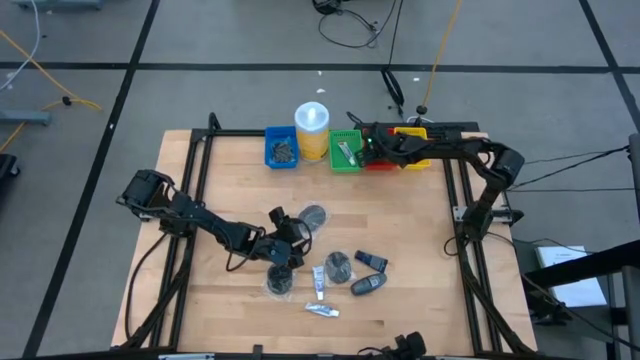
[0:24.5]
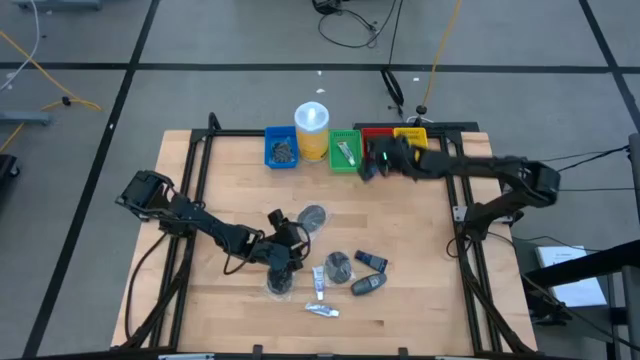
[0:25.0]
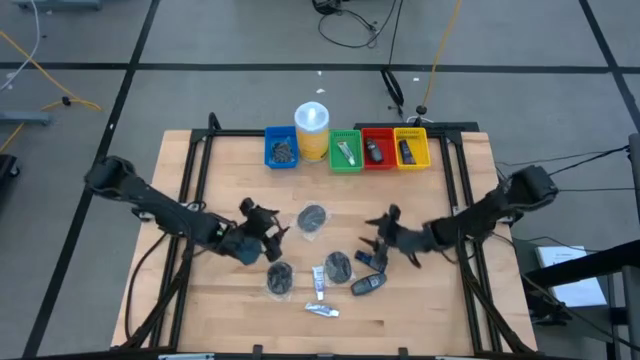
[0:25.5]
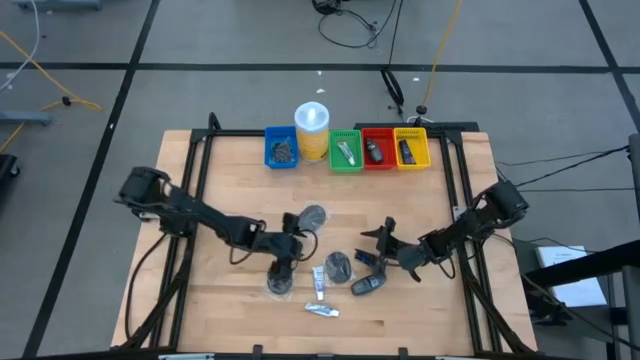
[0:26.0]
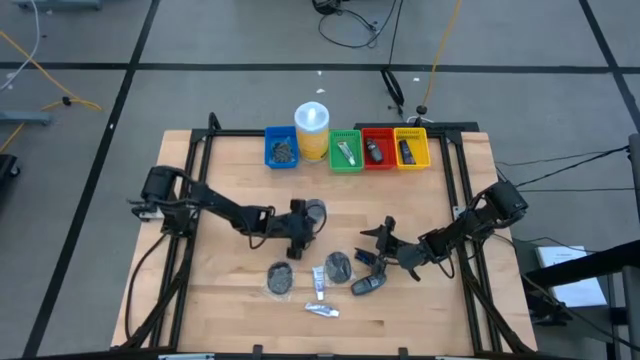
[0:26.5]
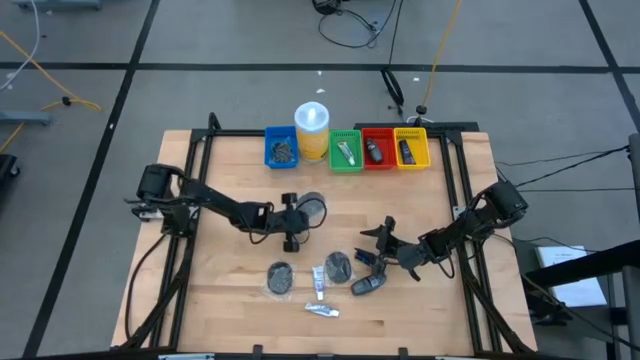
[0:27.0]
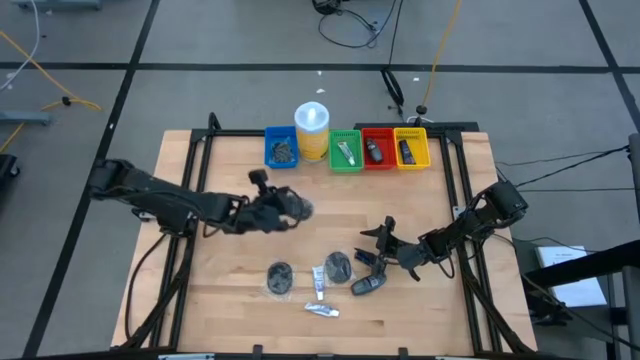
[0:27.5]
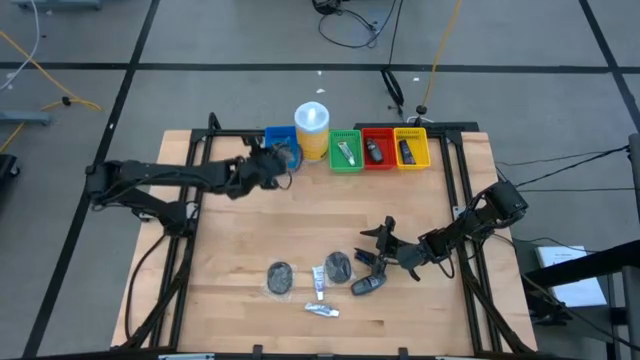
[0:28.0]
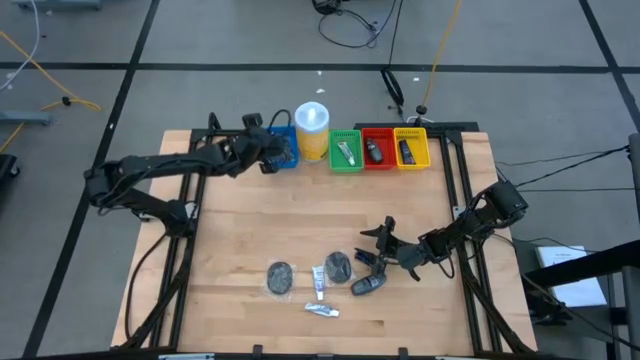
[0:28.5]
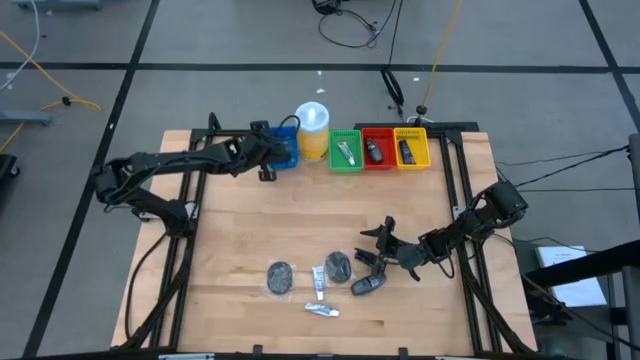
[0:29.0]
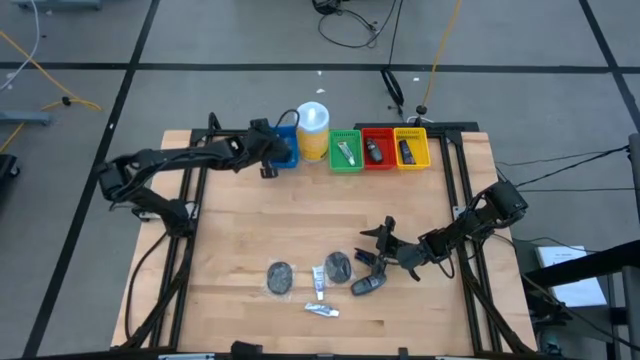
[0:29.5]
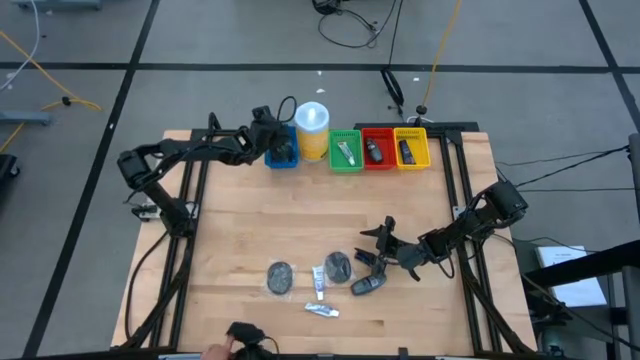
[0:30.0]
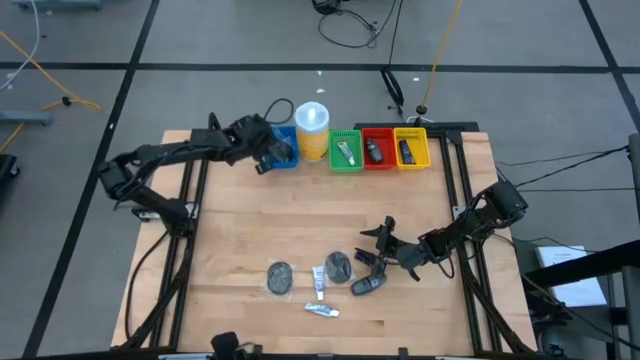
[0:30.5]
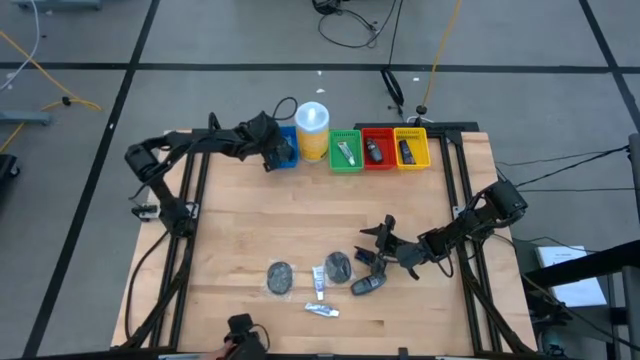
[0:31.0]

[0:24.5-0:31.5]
Task: Pick & Place Travel size toiletries
Put the hairbrush into the blue basket

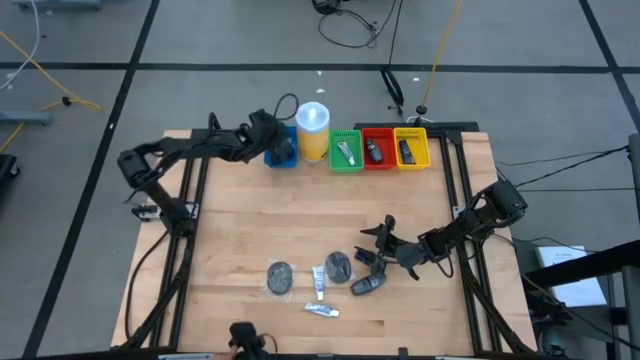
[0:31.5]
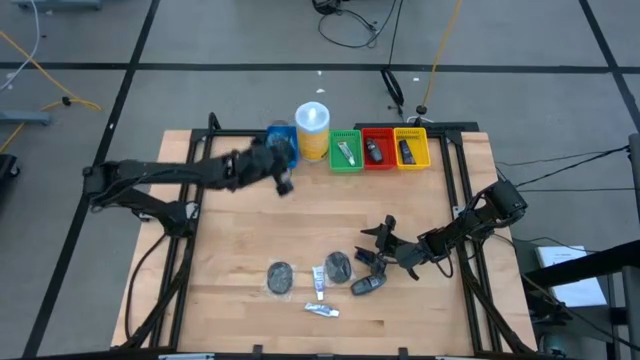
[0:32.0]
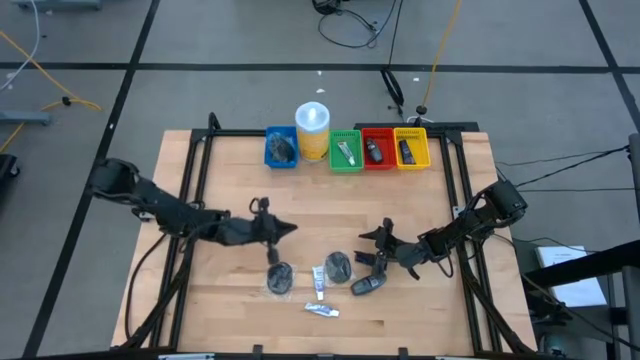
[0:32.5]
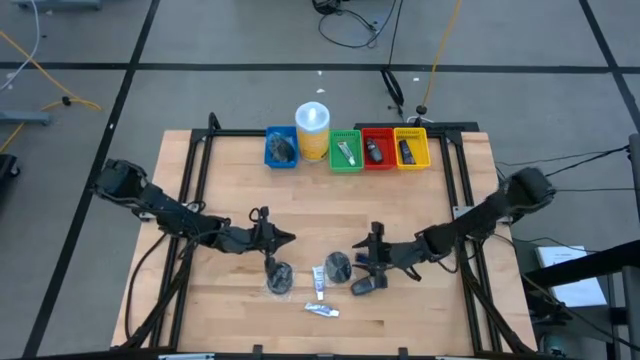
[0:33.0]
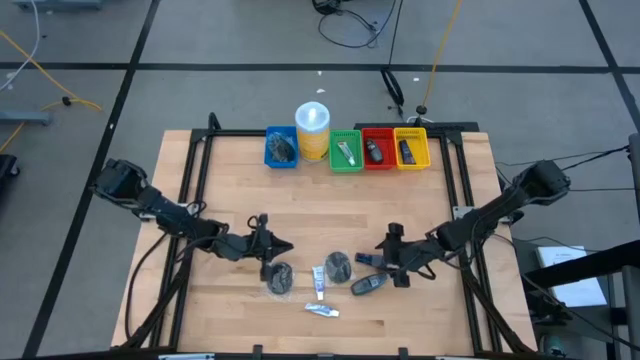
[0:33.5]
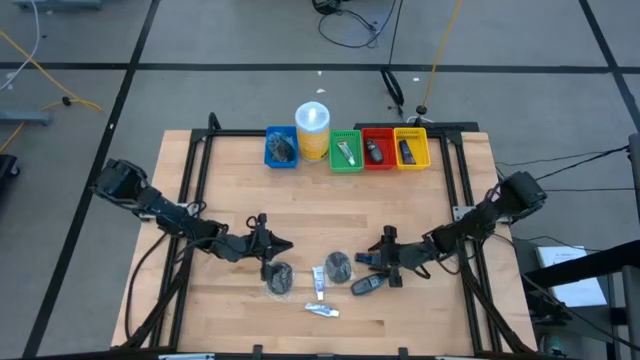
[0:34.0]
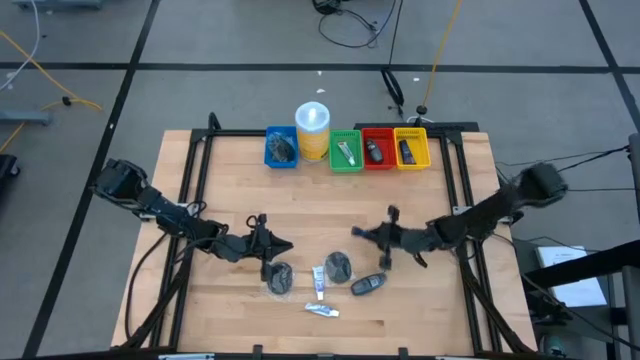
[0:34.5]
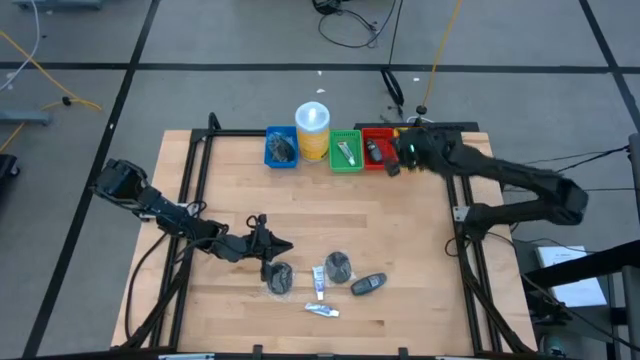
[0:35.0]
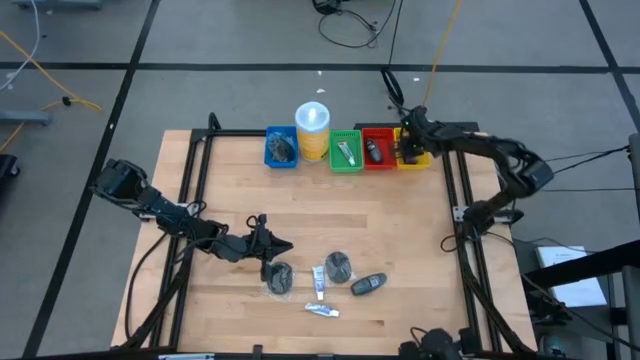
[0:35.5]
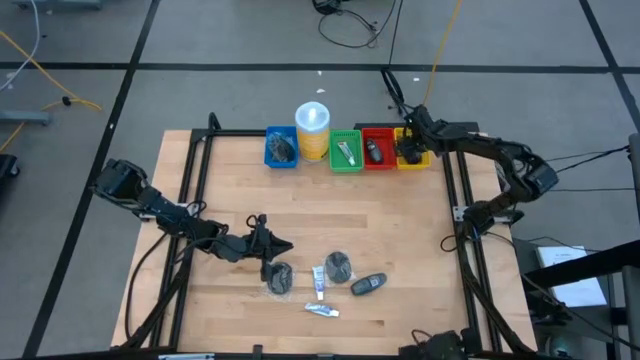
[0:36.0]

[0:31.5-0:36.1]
Put the shave cream into the yellow basket

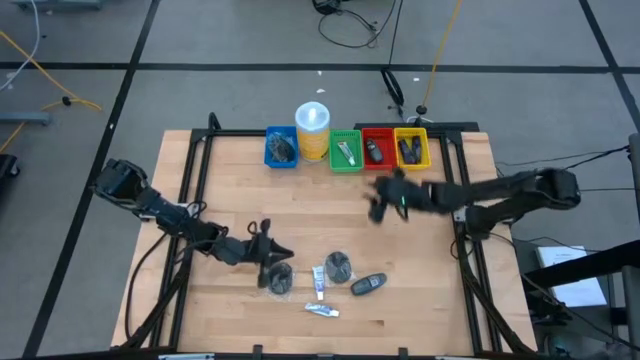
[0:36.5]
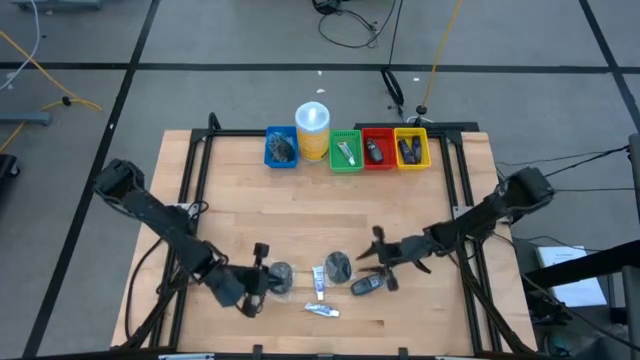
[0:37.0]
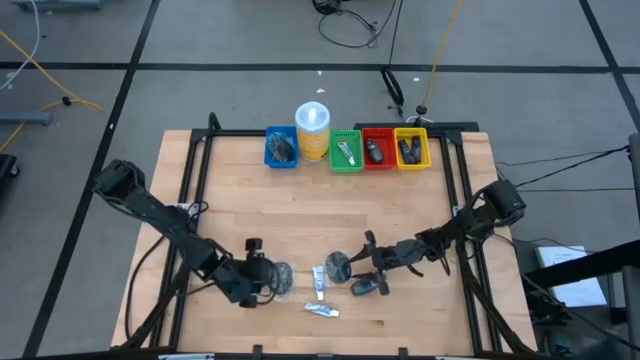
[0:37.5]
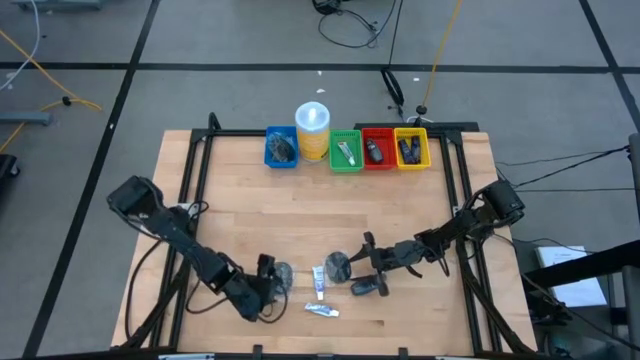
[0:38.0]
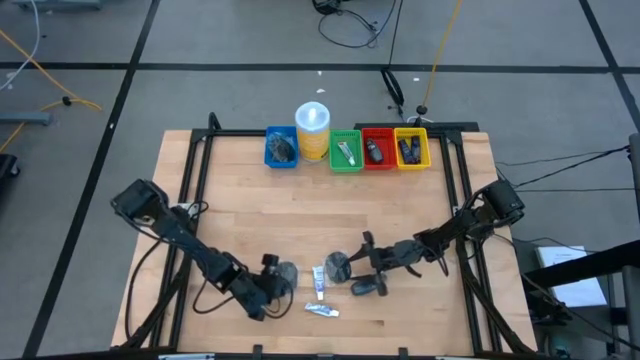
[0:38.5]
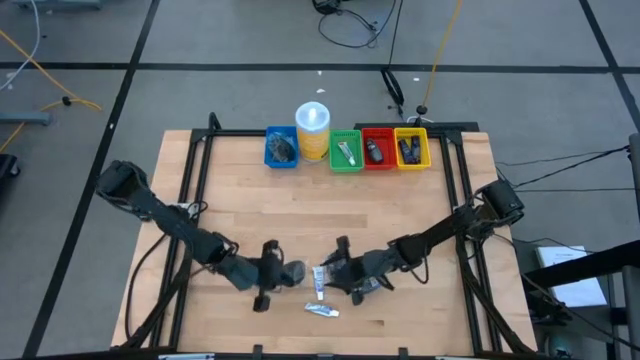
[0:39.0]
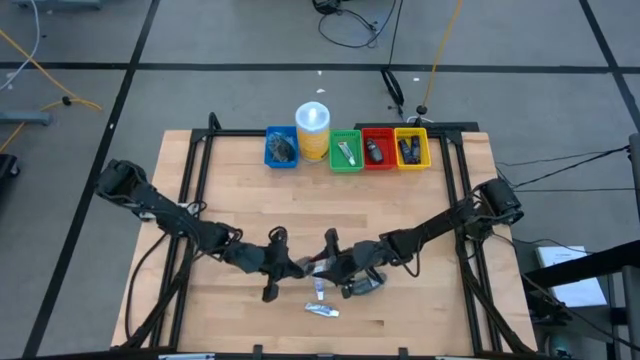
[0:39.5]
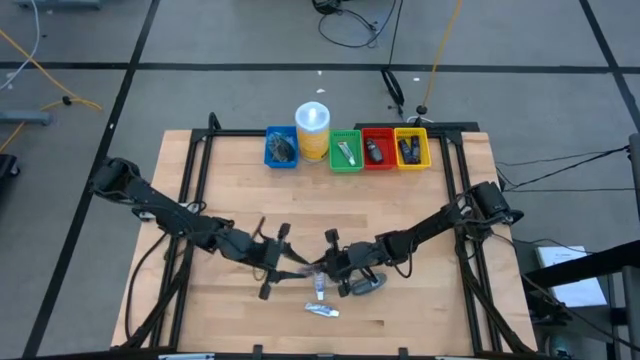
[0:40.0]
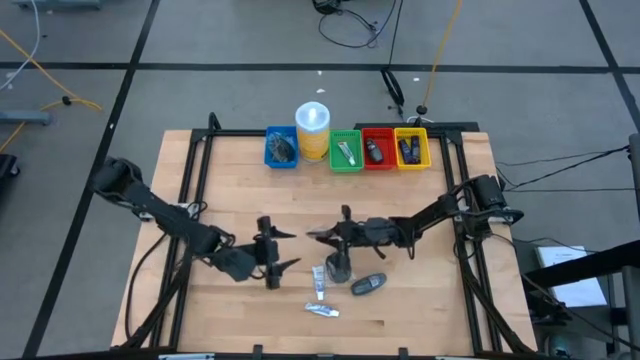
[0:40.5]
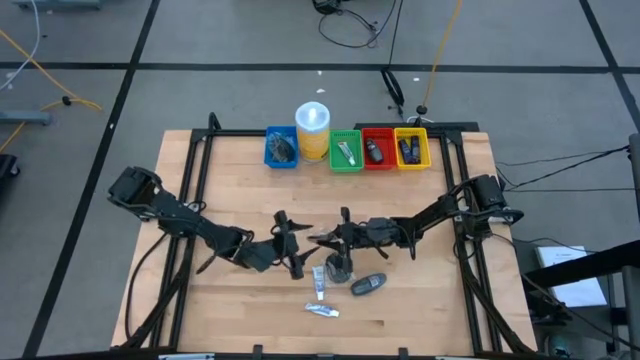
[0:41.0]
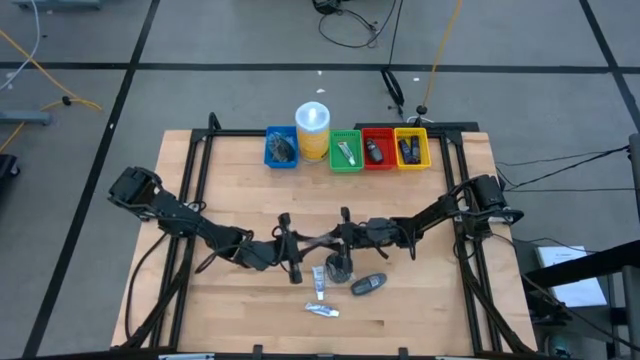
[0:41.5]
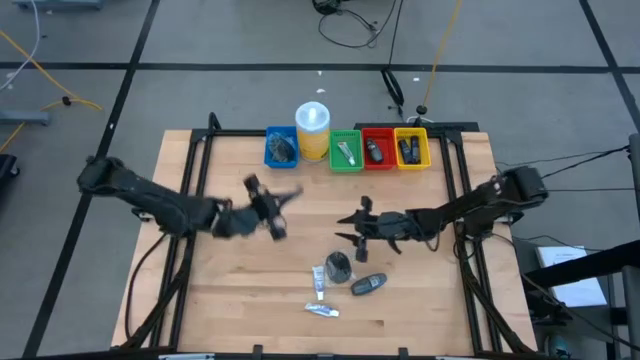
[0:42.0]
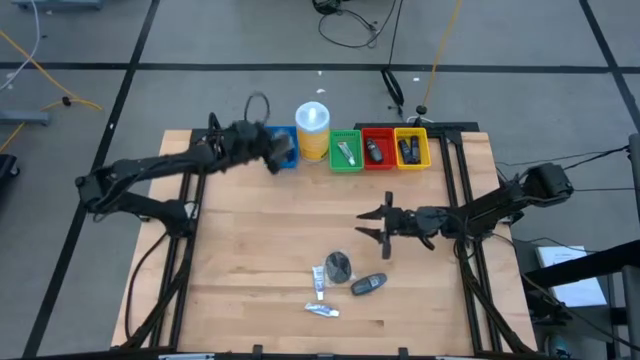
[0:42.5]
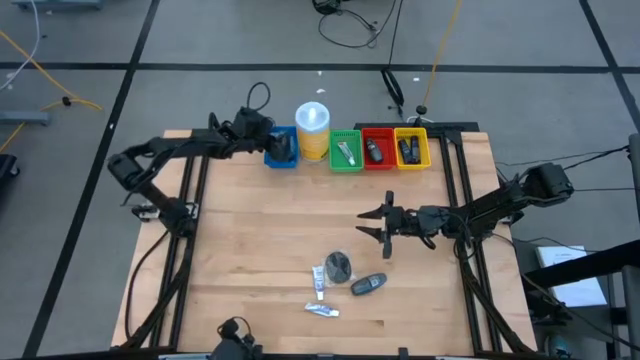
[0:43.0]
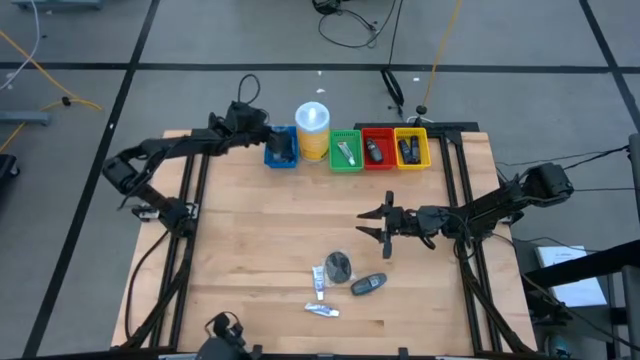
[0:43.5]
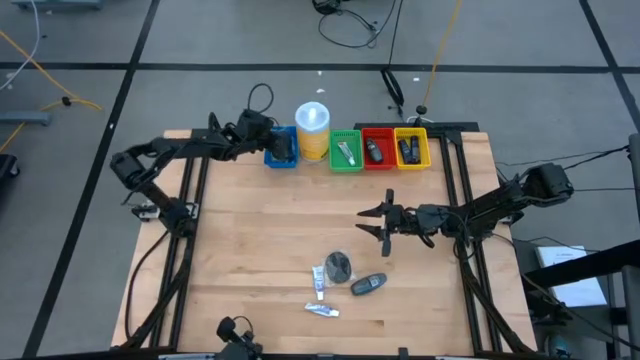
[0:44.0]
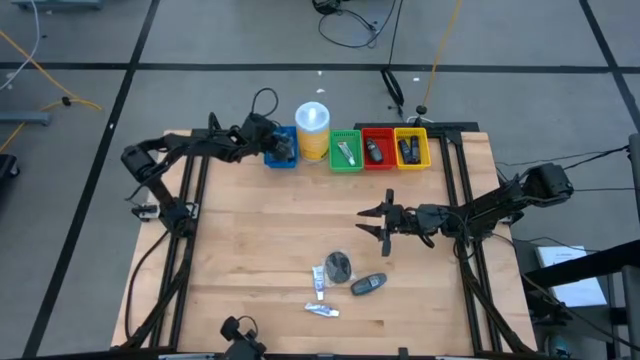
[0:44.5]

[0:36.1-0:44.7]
Put the hairbrush into the blue basket

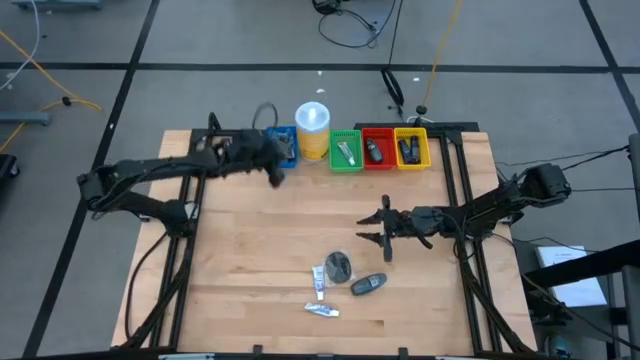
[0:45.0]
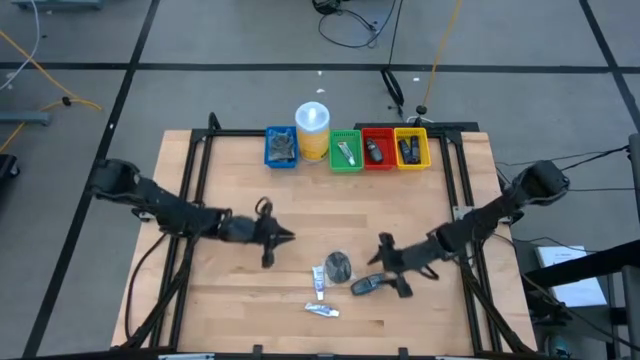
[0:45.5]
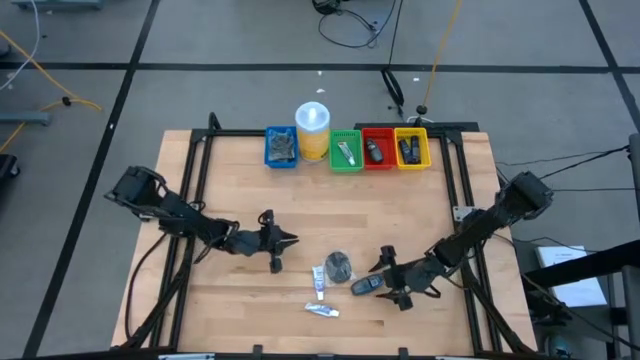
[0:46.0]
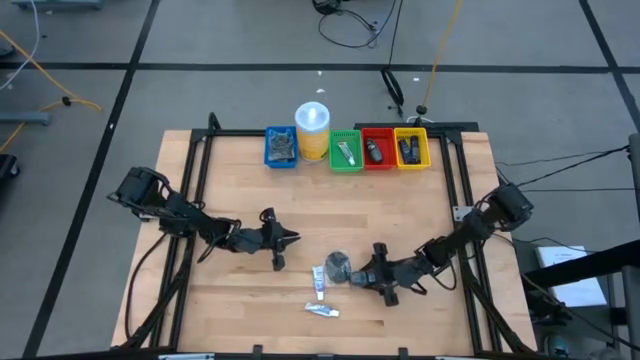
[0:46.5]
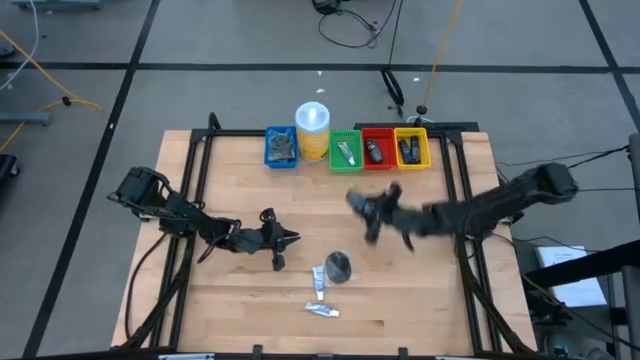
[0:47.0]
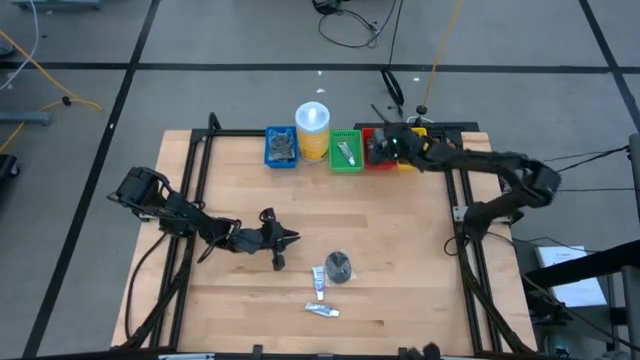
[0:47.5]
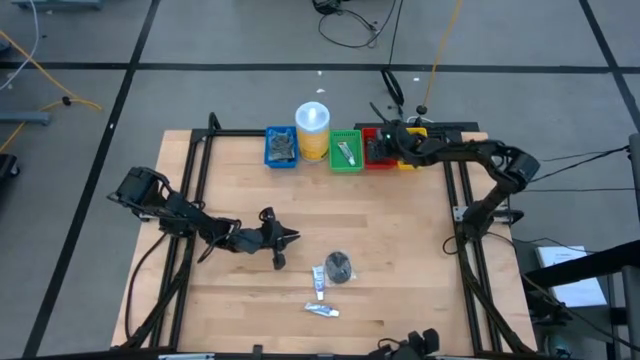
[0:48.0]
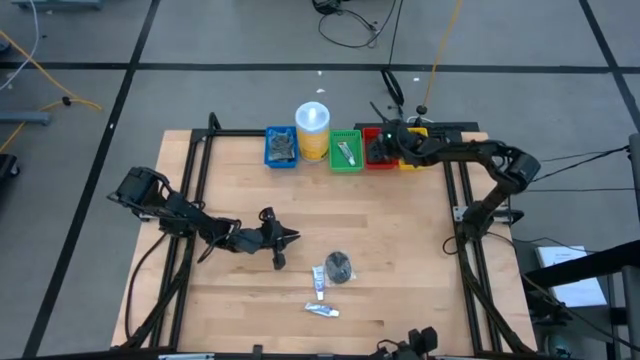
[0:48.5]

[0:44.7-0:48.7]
Put the deodorant into the red basket
